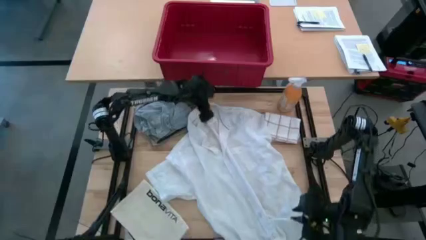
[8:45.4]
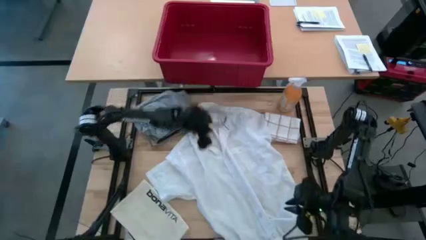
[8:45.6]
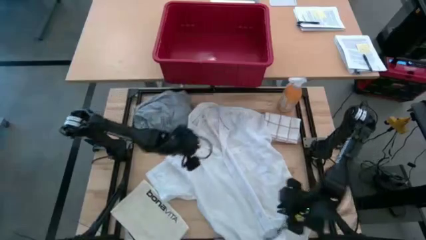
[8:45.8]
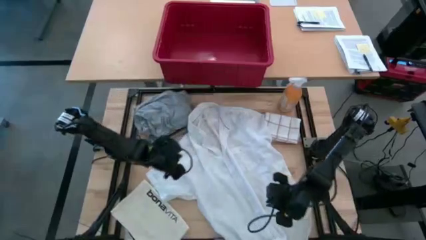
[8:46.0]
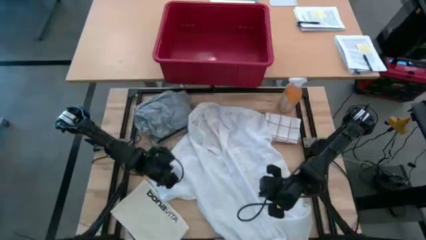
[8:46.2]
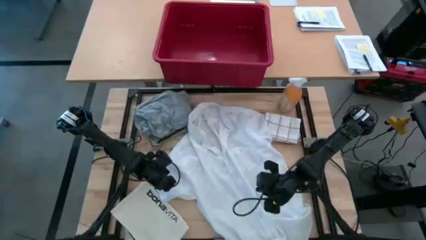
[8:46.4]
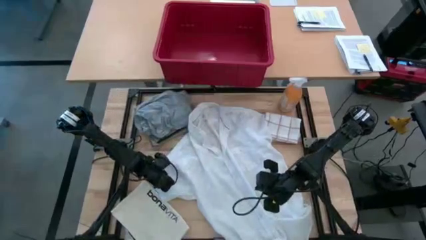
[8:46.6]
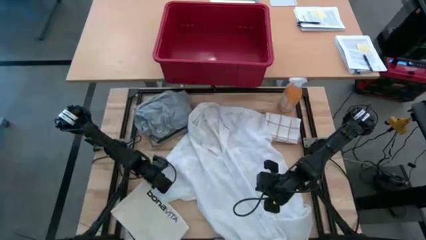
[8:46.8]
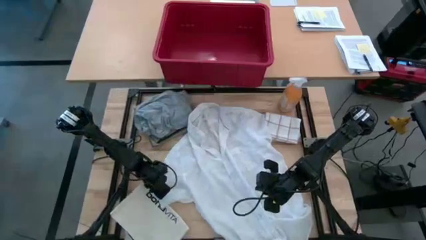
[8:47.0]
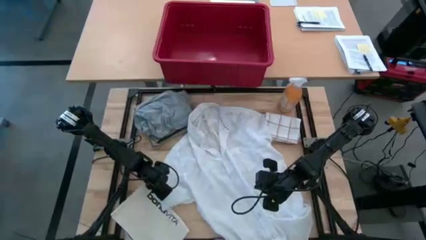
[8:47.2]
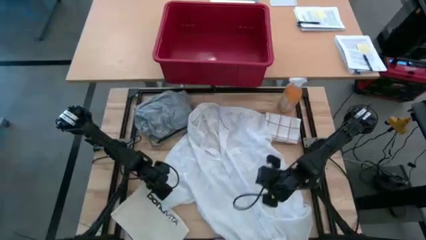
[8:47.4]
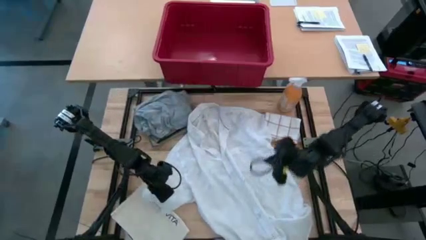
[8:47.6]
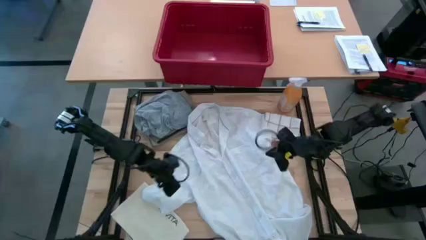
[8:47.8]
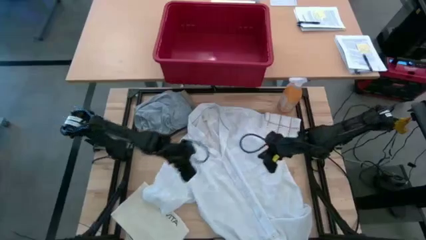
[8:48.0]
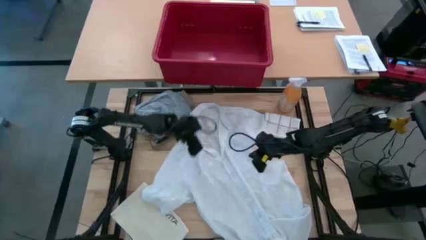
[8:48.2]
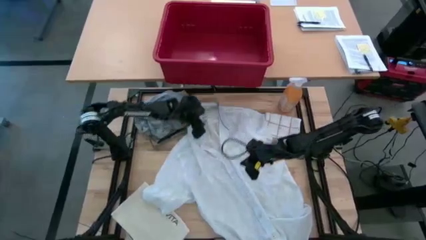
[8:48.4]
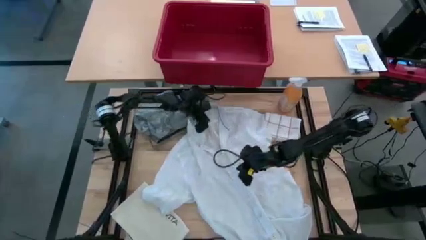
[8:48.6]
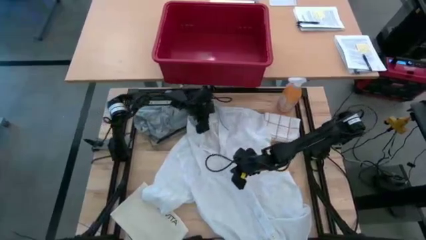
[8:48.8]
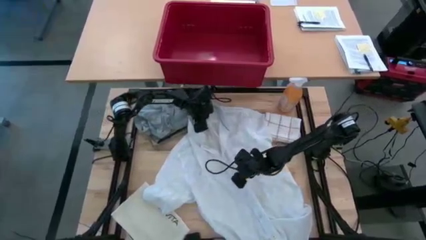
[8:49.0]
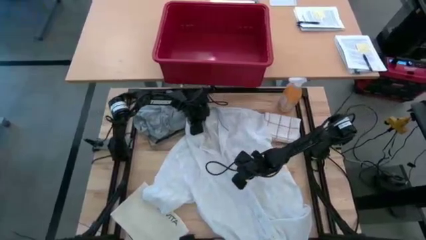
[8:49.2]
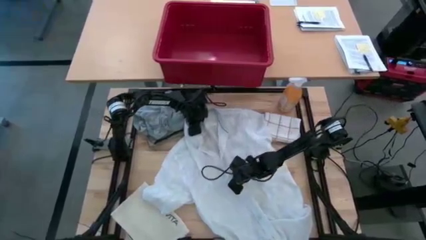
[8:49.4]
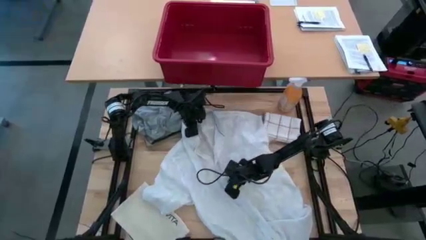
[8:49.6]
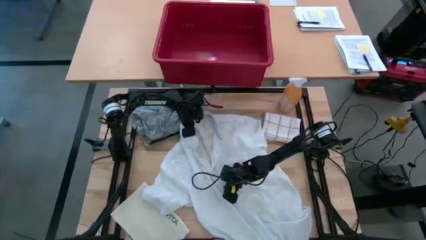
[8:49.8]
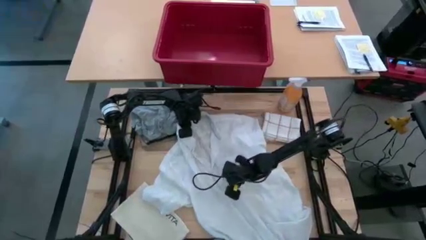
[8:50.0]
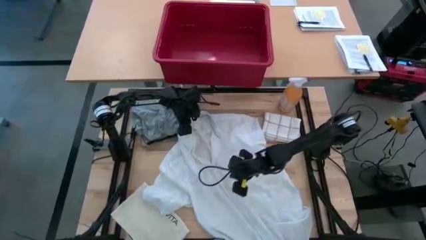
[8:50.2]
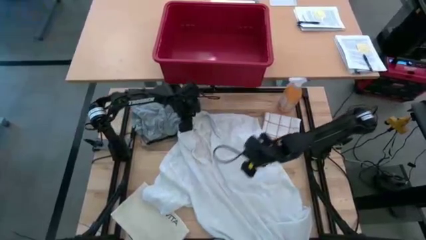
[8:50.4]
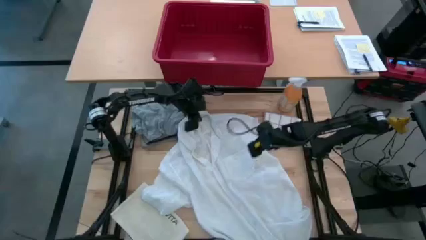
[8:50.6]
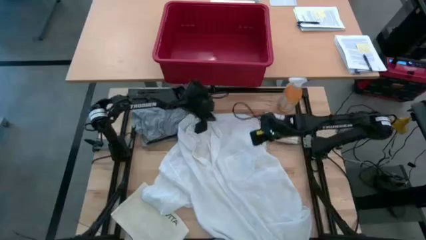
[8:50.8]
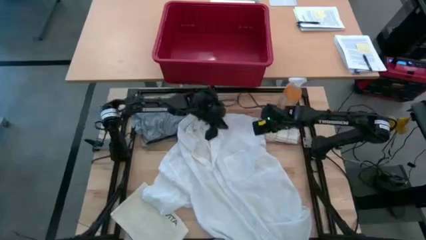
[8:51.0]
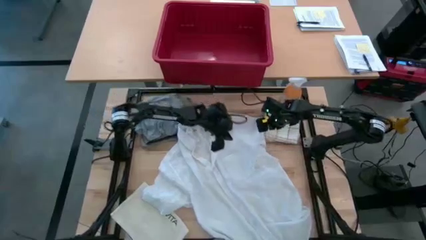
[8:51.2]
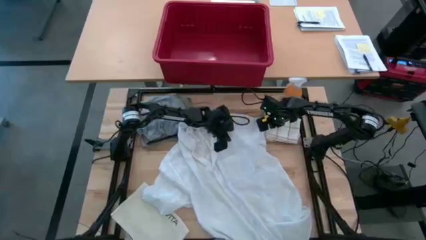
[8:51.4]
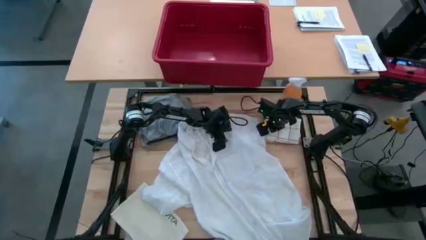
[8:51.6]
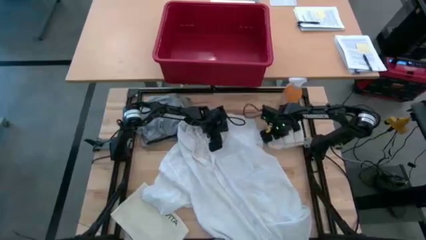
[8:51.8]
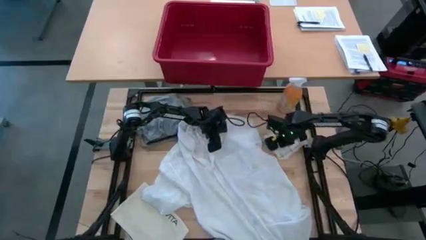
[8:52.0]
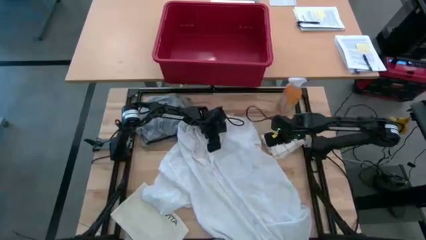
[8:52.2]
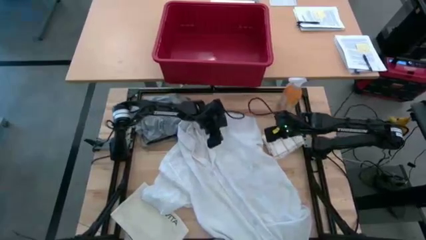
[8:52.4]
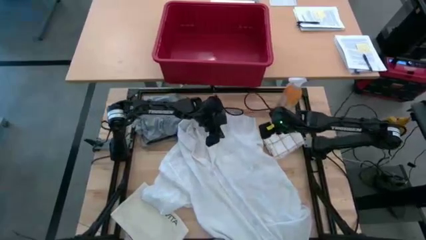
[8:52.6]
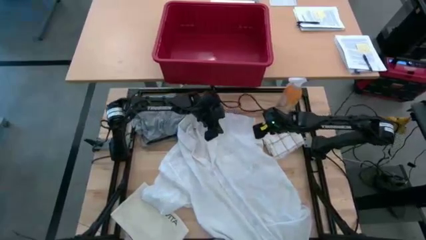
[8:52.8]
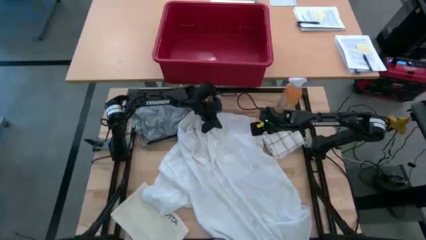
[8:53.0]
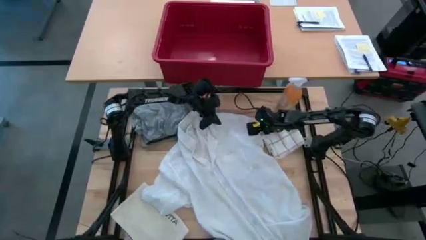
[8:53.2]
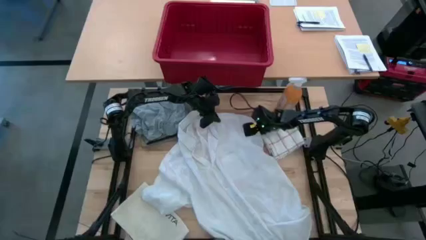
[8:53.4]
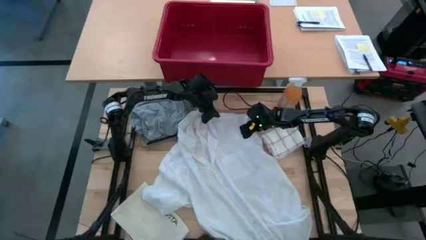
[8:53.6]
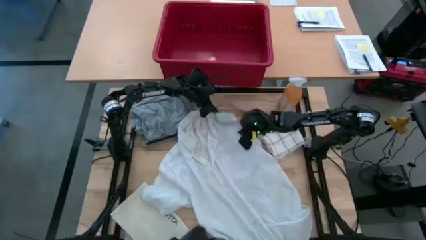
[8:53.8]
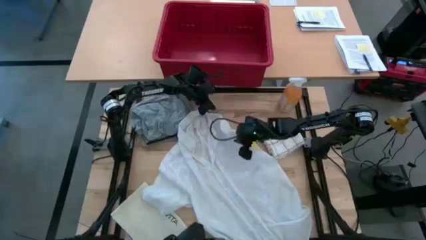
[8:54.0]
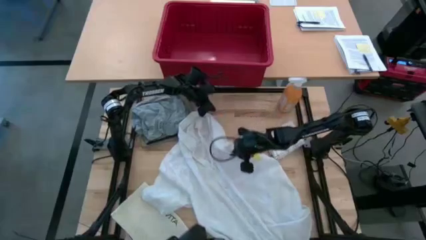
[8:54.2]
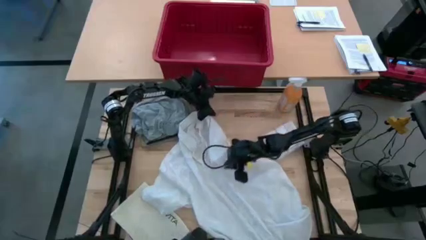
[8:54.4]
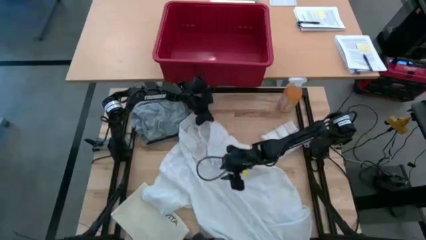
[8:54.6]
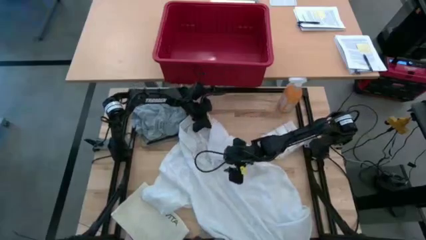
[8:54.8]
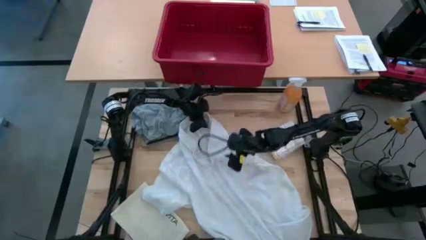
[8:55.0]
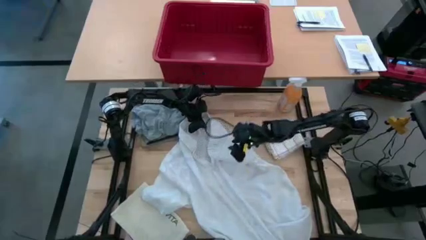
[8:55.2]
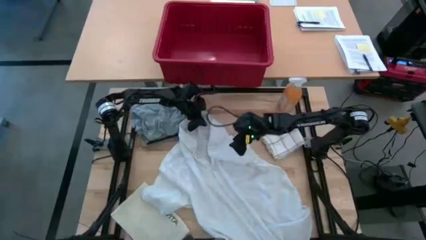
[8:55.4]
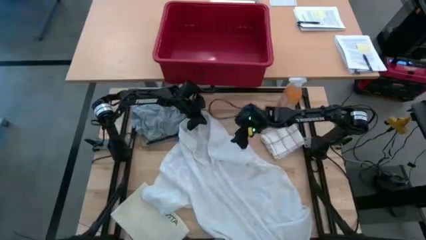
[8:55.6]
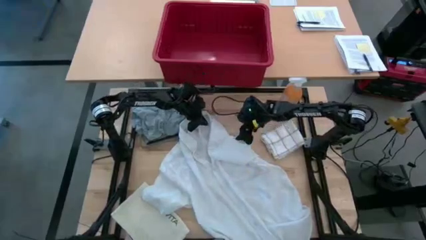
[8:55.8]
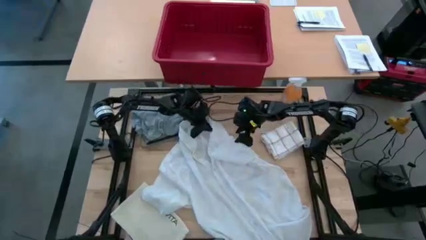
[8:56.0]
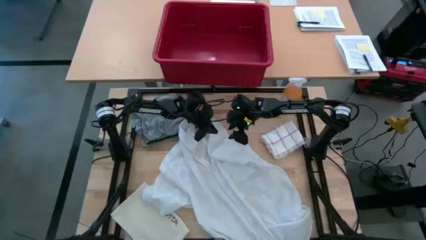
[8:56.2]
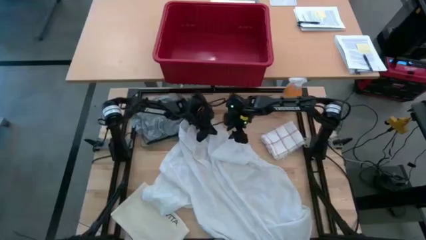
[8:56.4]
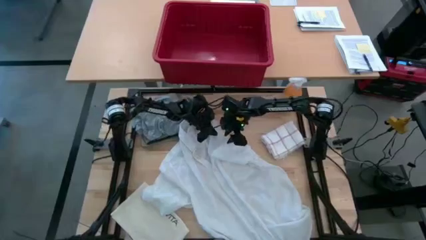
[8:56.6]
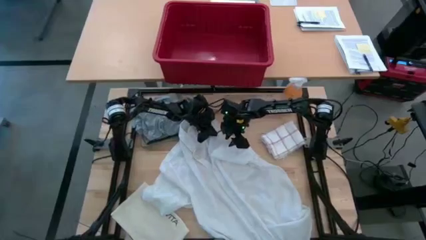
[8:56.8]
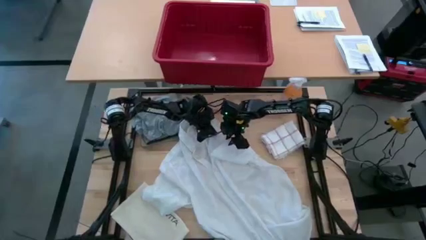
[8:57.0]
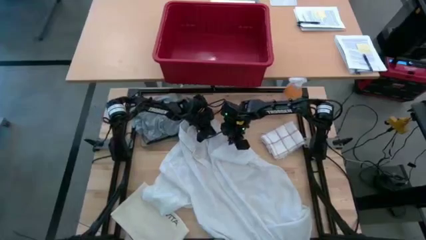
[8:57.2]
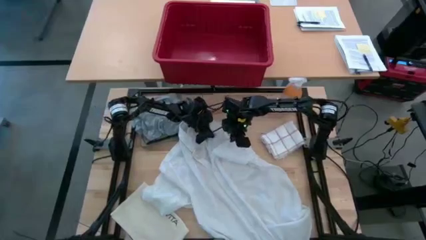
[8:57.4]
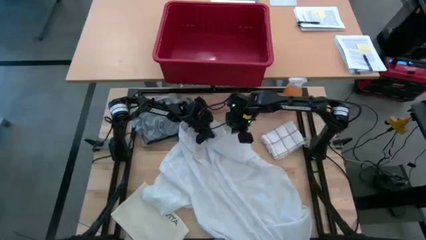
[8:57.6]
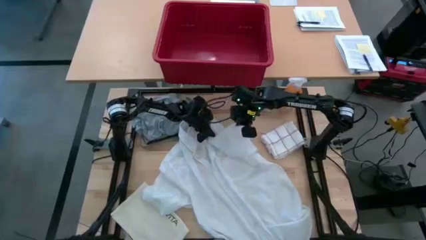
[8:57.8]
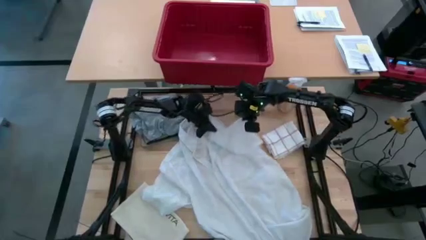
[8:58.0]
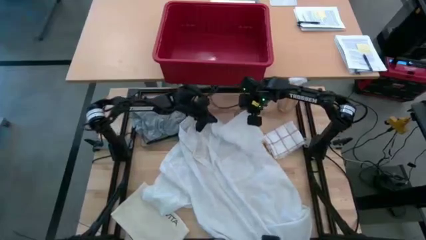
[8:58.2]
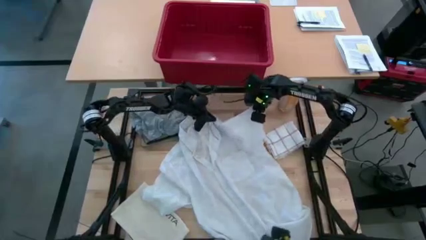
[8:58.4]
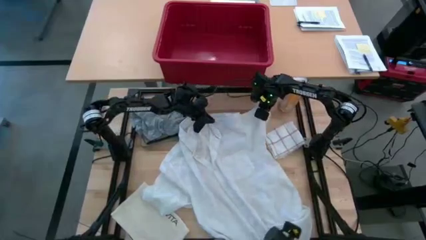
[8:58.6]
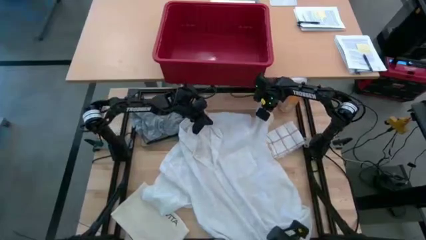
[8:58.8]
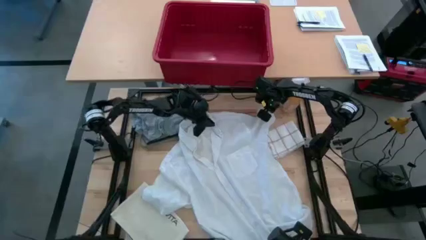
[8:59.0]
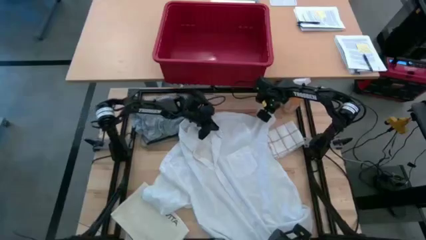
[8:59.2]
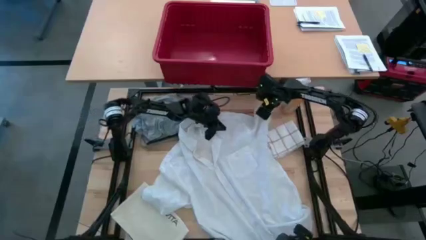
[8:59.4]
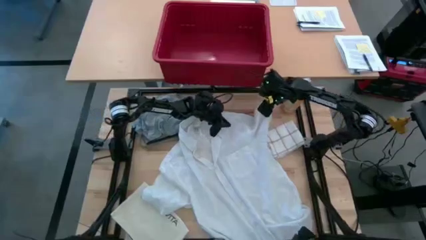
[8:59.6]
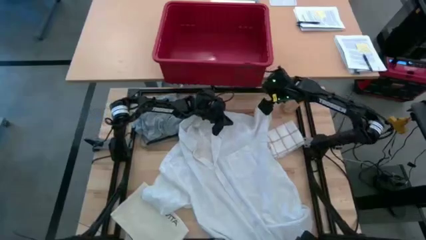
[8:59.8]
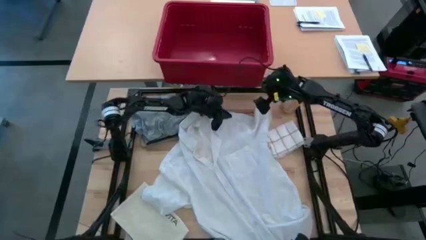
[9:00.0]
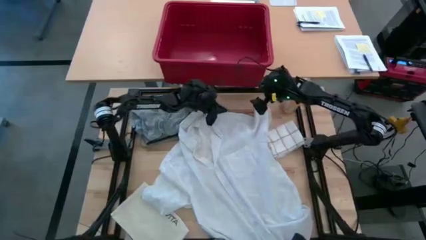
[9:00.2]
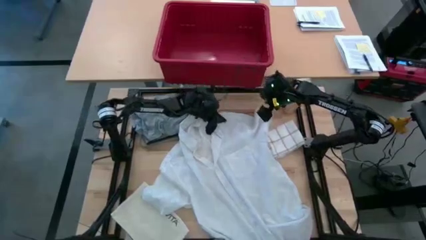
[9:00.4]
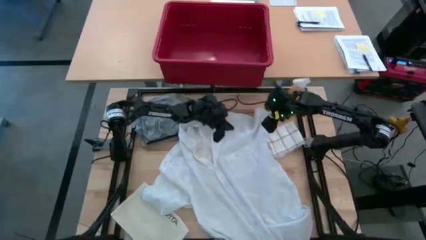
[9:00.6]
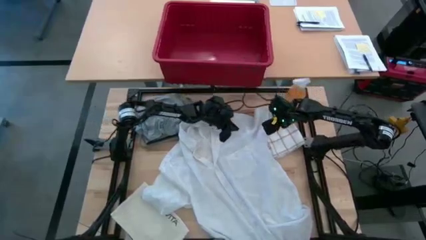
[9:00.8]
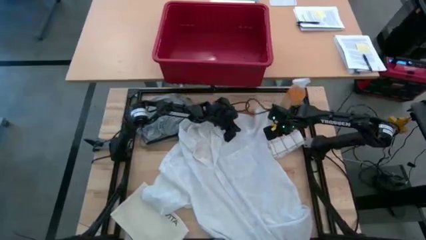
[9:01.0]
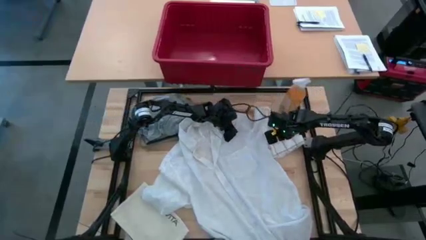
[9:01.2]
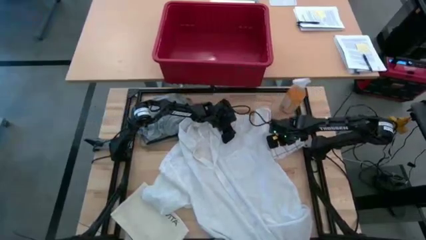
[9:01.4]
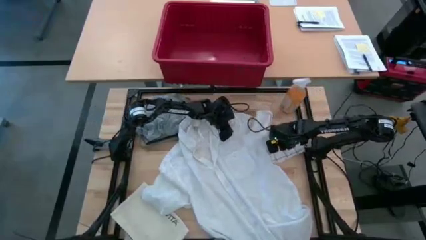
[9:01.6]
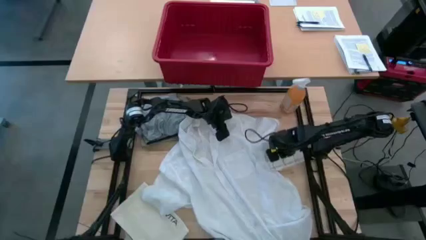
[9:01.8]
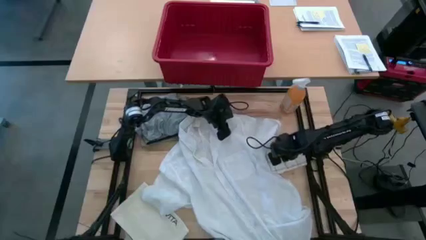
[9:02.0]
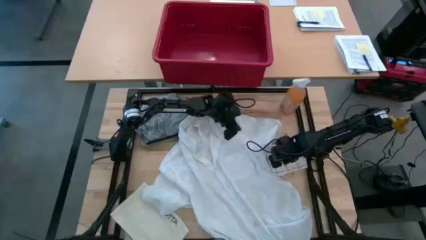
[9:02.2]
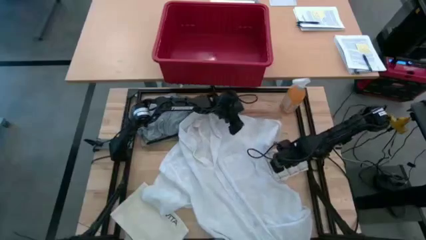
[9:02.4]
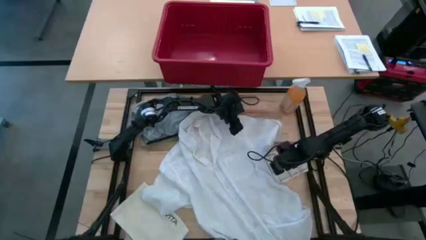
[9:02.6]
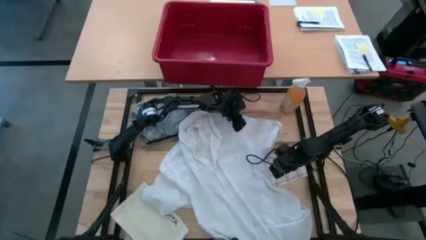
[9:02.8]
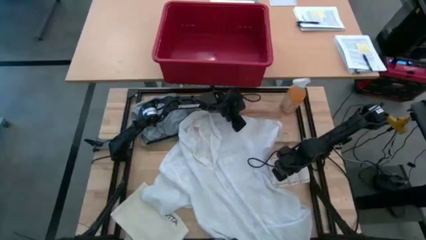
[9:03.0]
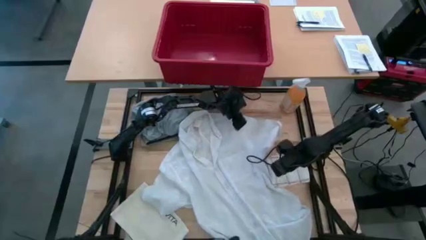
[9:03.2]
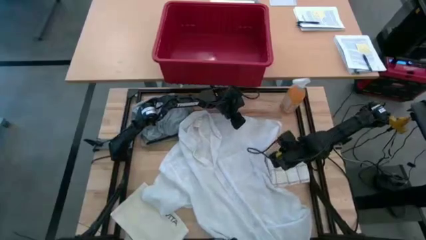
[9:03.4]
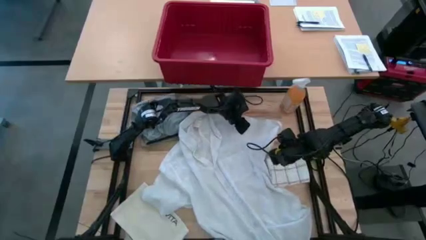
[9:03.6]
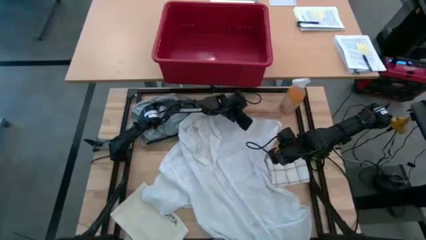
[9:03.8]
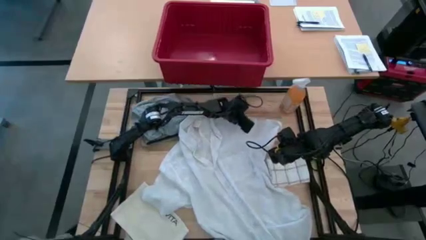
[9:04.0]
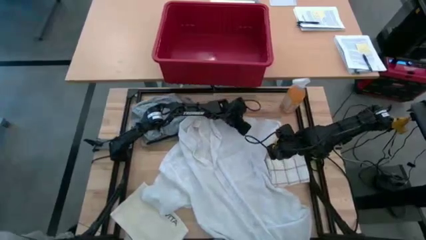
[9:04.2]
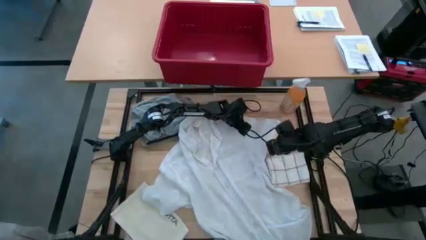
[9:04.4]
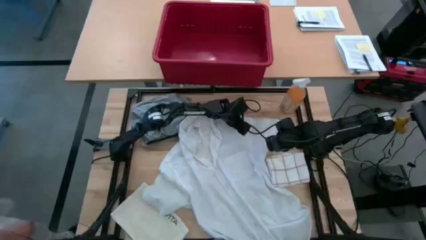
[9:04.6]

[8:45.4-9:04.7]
Task: Fold laundry
Fold the white long sleeve shirt
